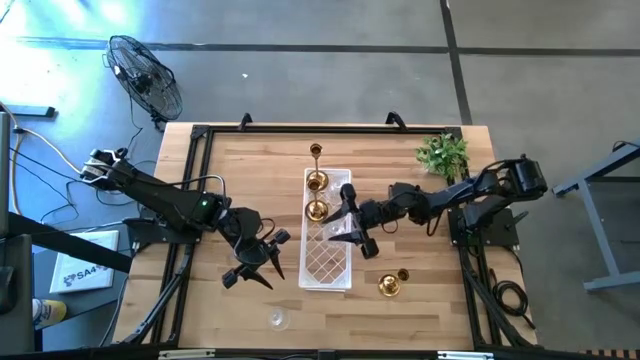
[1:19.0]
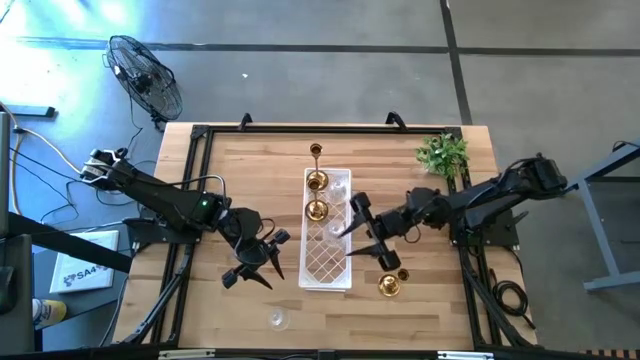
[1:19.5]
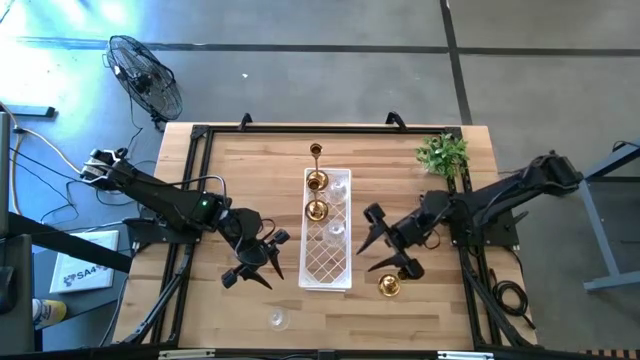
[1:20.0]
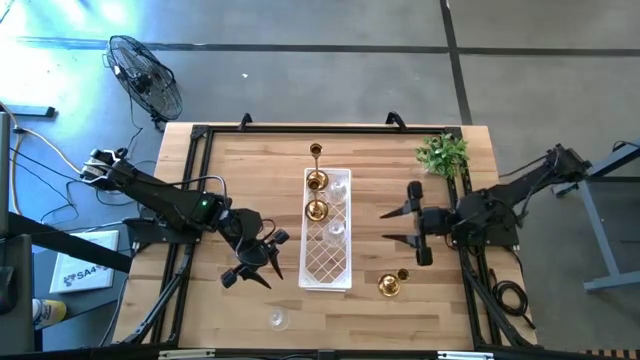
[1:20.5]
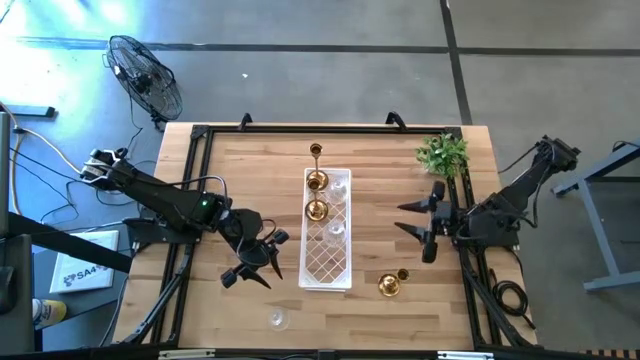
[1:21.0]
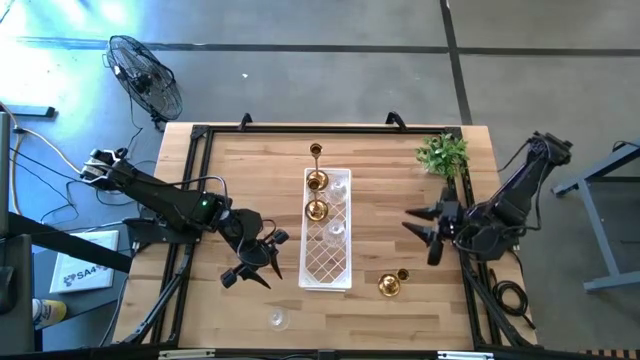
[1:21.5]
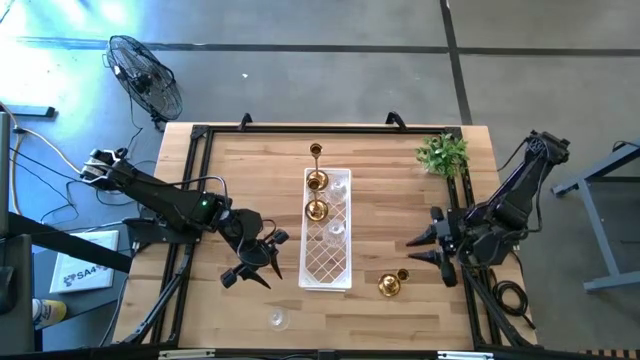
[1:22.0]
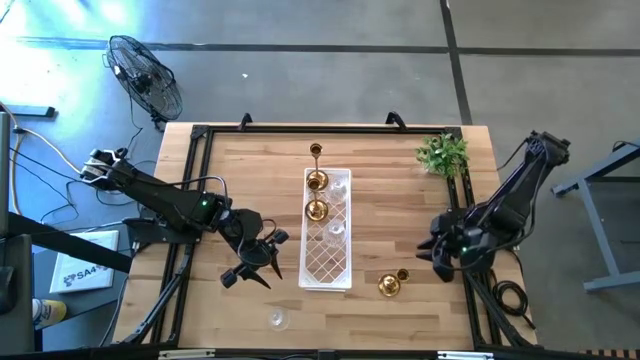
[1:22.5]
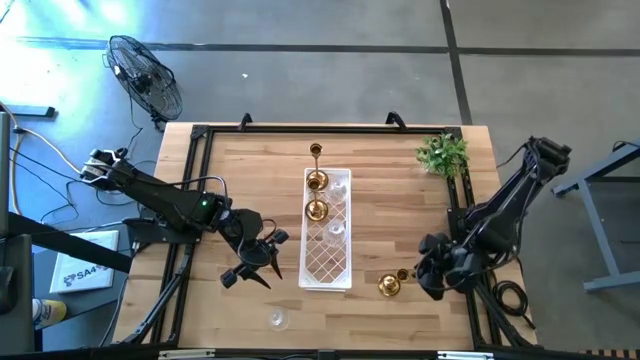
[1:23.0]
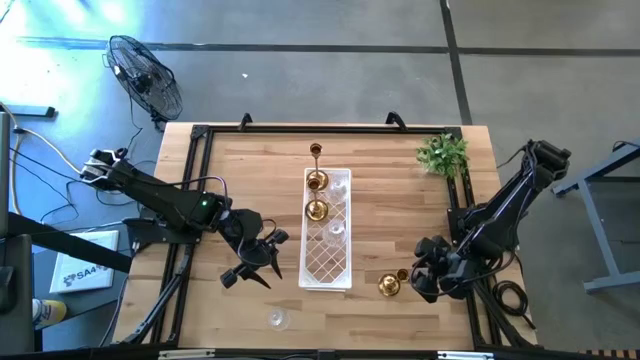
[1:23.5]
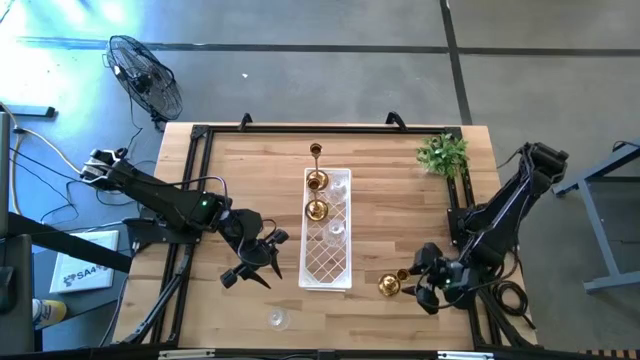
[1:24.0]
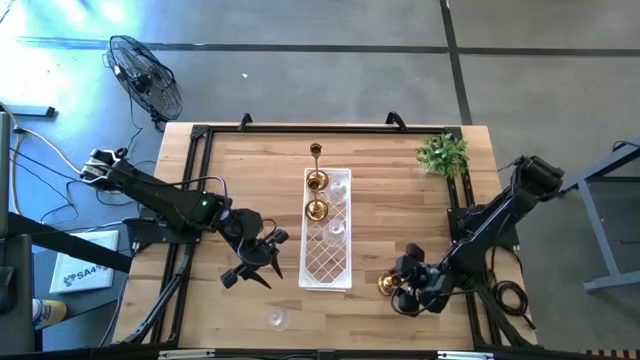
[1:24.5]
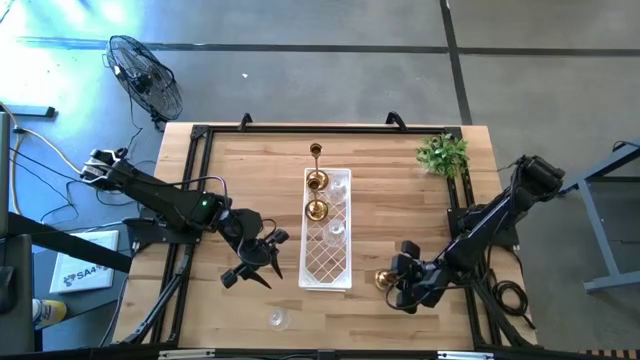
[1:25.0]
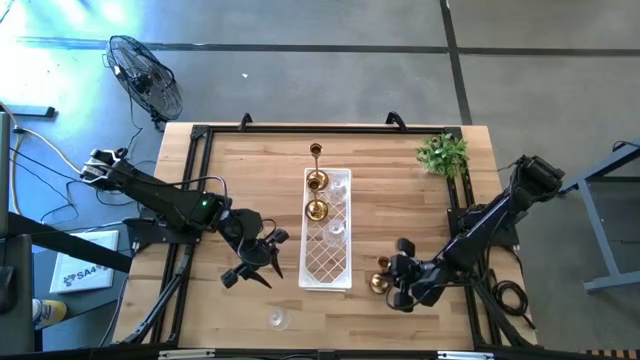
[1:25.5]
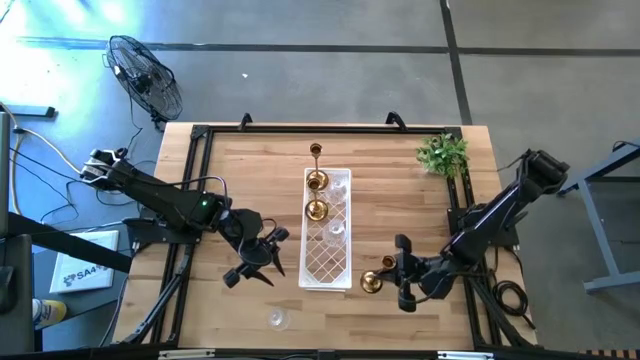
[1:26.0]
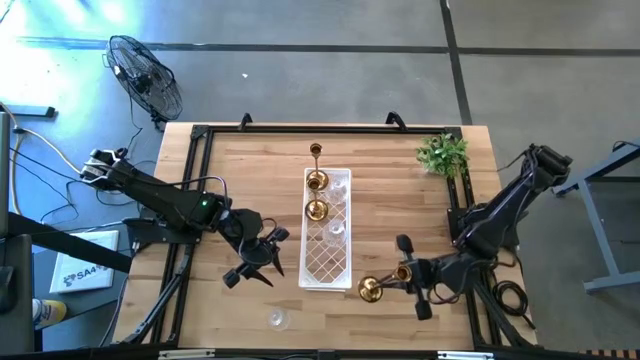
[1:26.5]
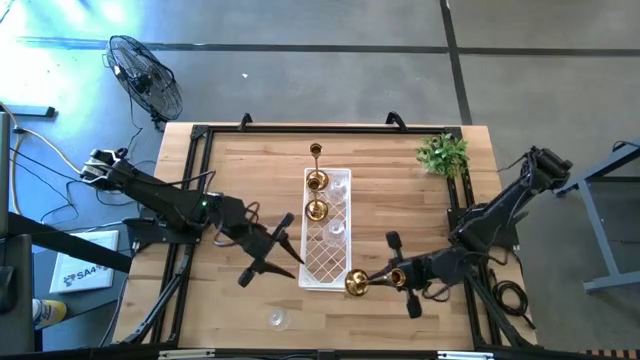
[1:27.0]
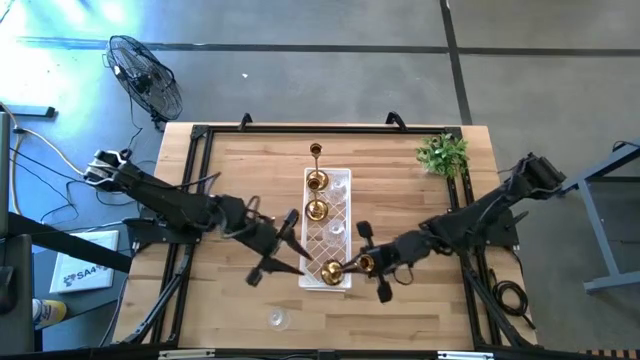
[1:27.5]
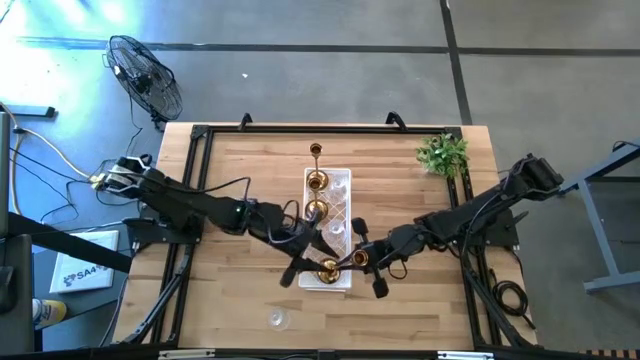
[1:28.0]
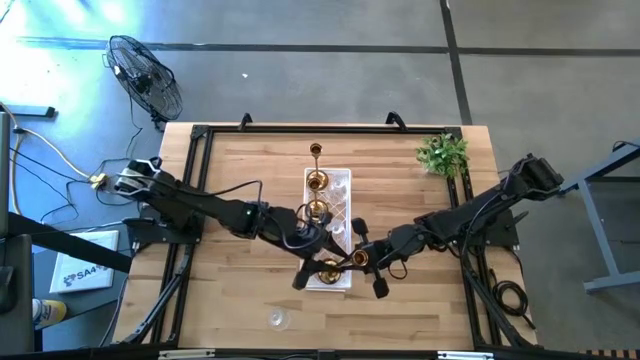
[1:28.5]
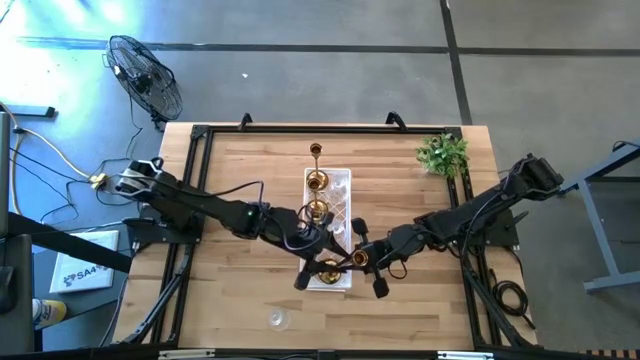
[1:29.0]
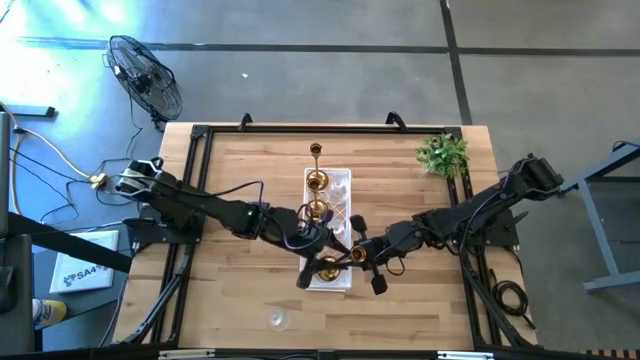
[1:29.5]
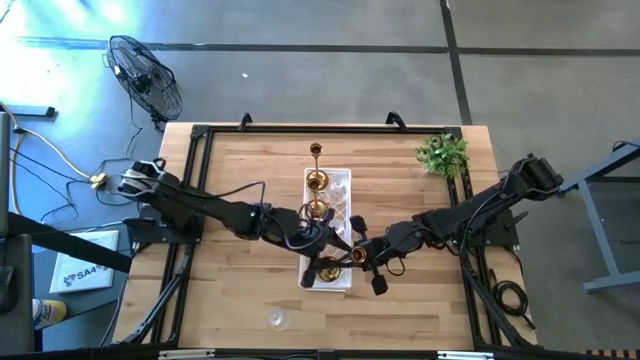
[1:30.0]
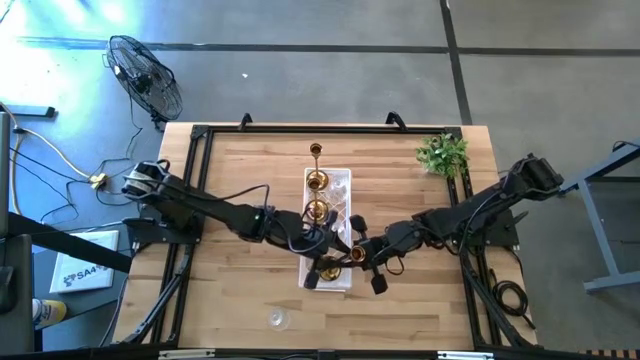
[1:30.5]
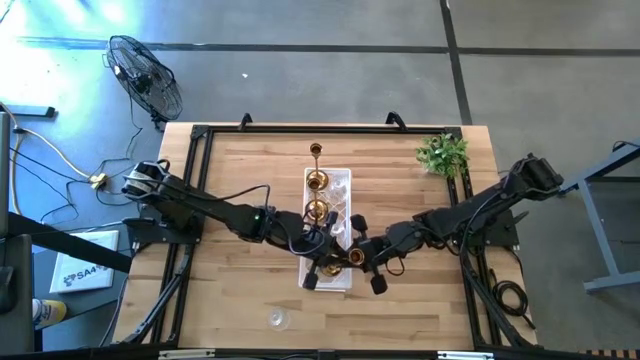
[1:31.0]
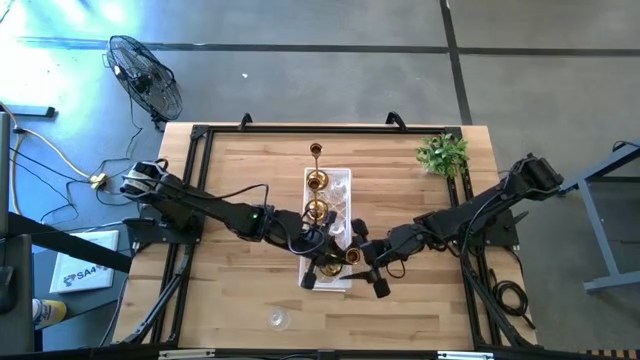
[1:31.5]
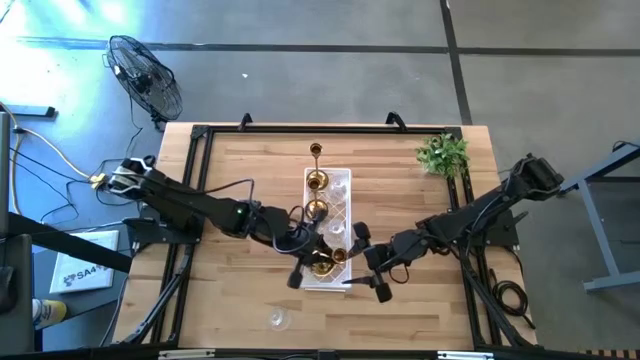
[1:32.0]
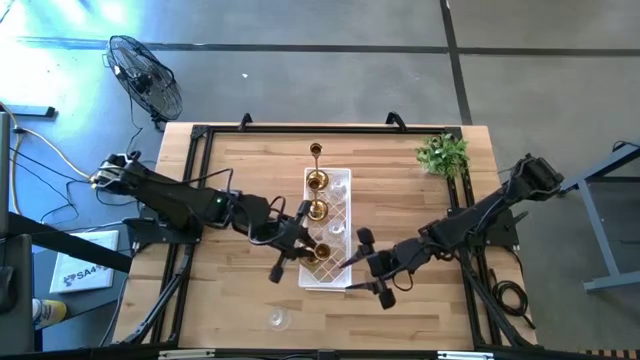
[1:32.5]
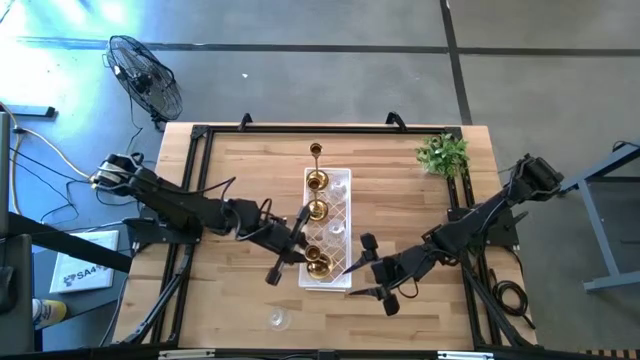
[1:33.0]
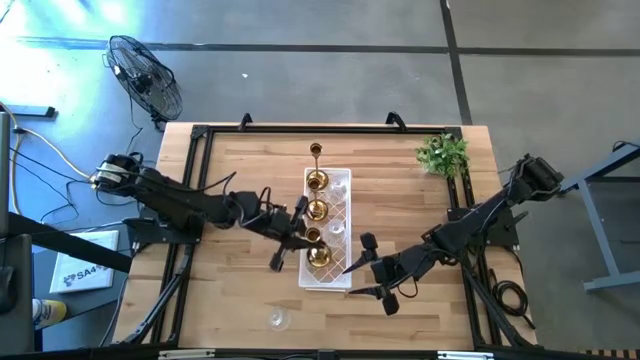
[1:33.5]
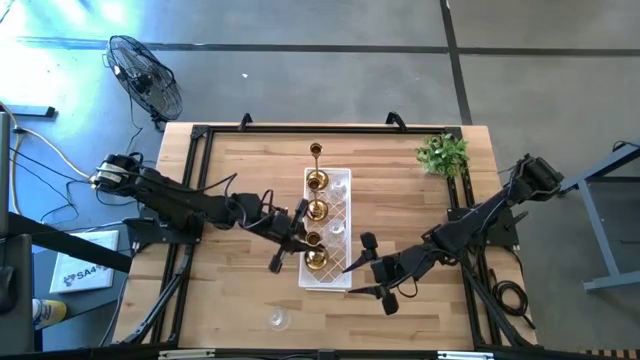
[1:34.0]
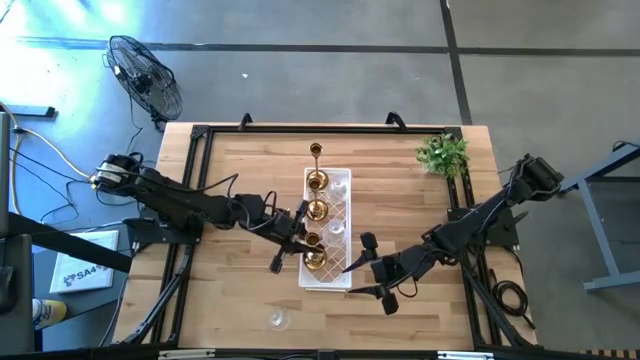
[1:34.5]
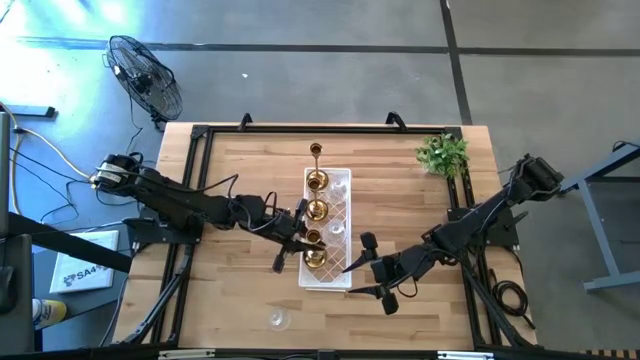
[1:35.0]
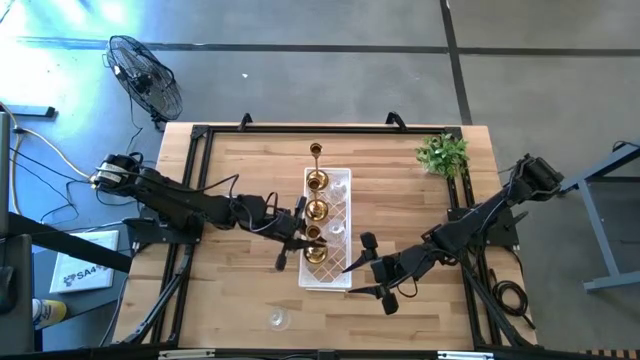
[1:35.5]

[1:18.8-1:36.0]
Task: Pick & Place candle stick holders
Put the gold candle holder on the shelf aligned with the other gold candle holders

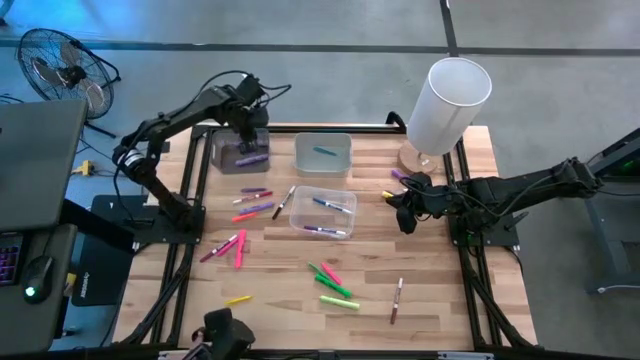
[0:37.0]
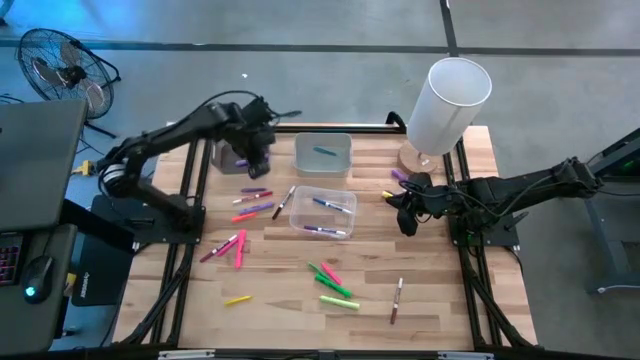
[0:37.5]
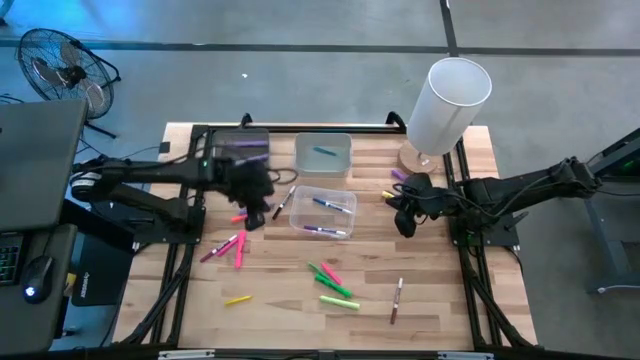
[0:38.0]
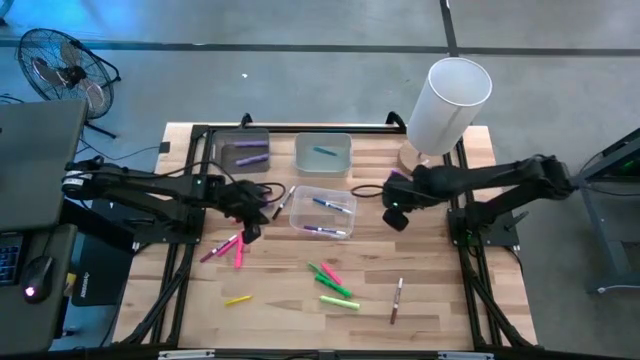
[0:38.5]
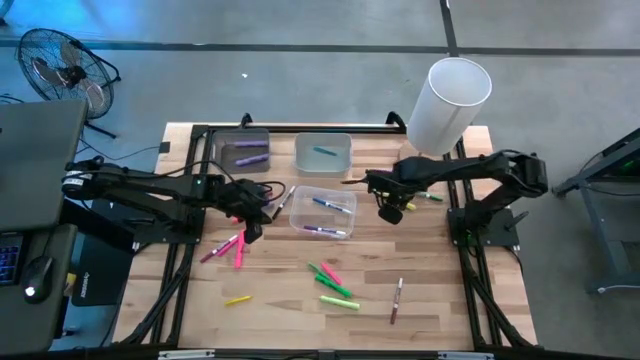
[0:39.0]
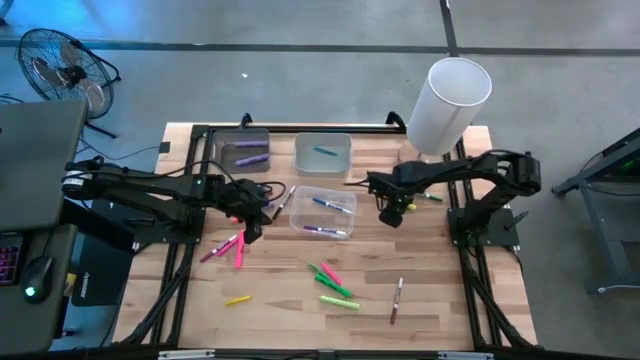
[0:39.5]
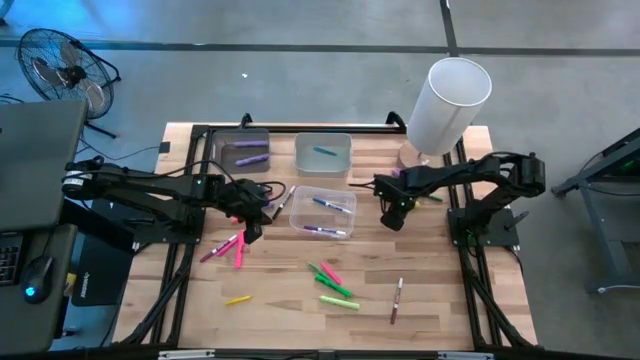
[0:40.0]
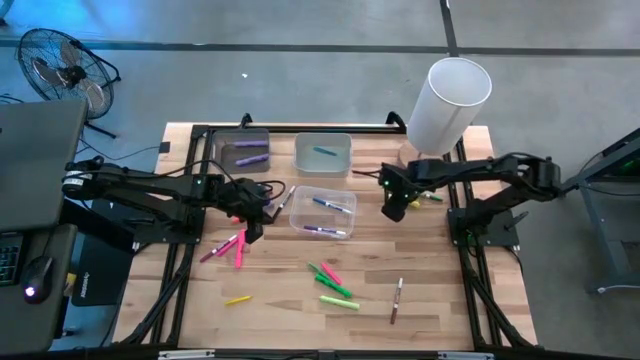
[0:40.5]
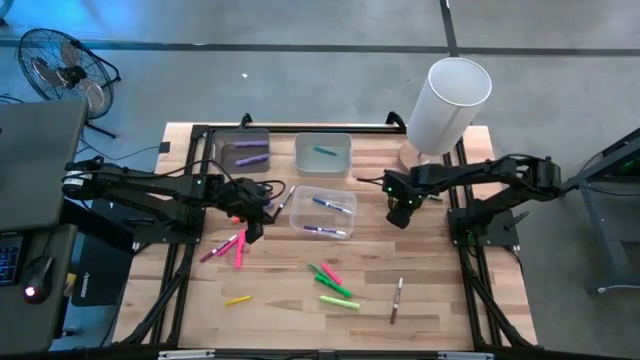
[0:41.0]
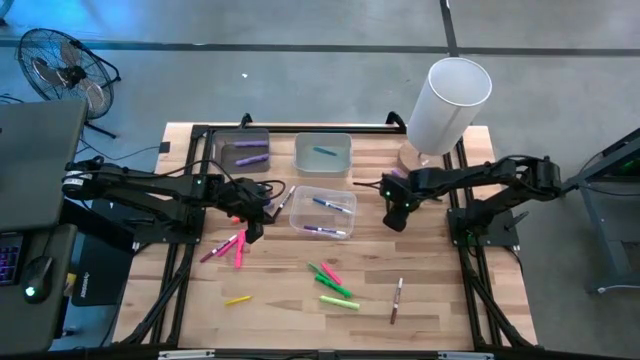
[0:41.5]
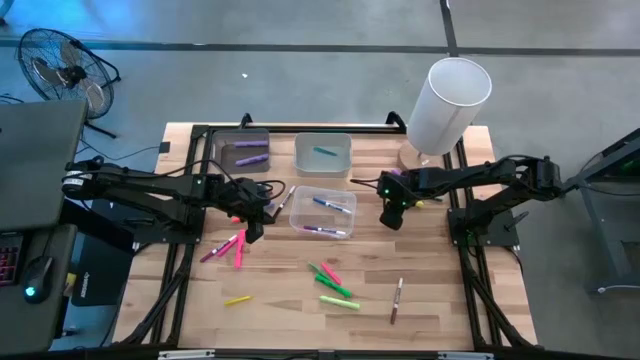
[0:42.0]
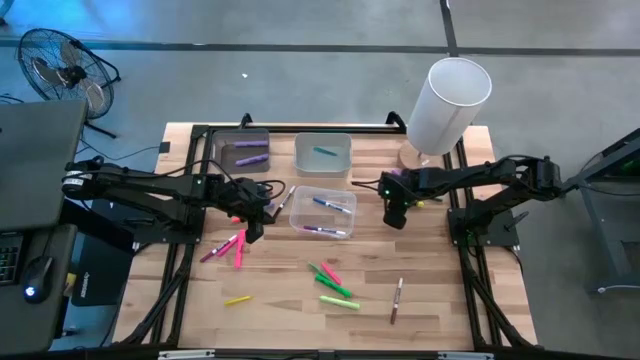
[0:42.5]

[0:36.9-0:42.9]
Task: Pick & Place Markers
Put the yellow highlighter into the black bin
